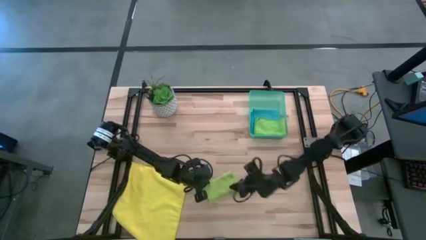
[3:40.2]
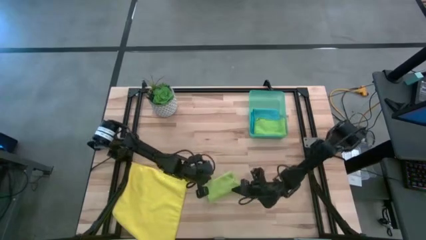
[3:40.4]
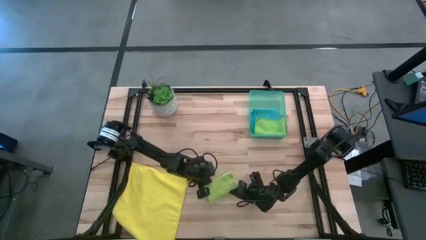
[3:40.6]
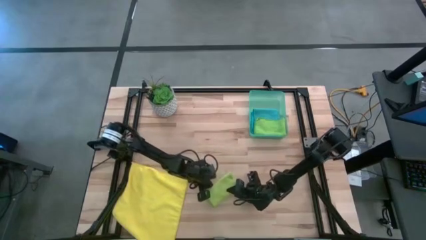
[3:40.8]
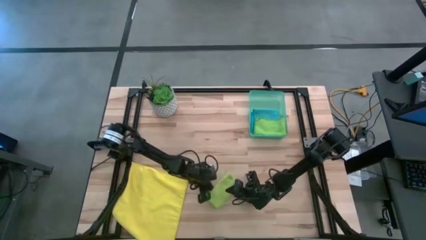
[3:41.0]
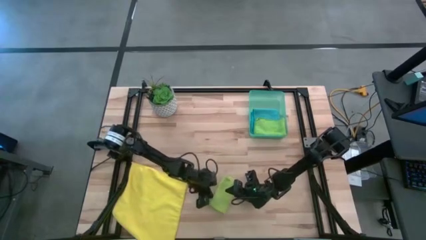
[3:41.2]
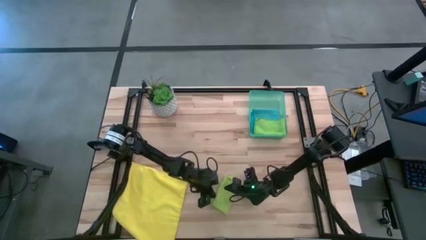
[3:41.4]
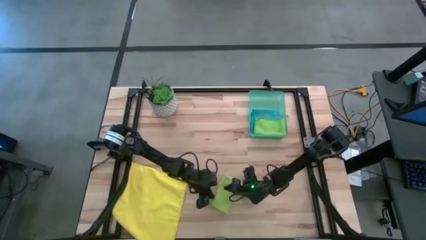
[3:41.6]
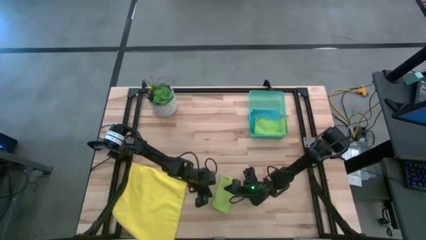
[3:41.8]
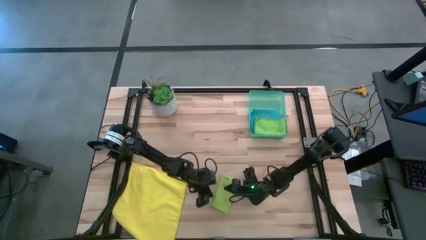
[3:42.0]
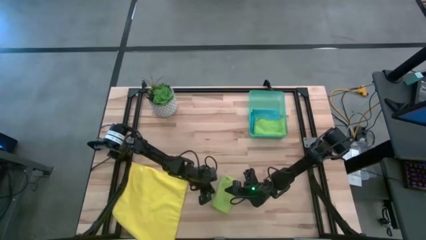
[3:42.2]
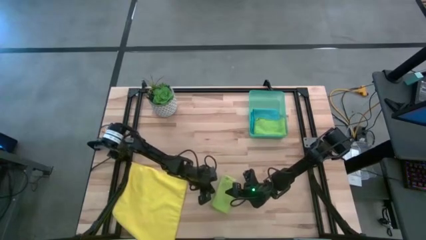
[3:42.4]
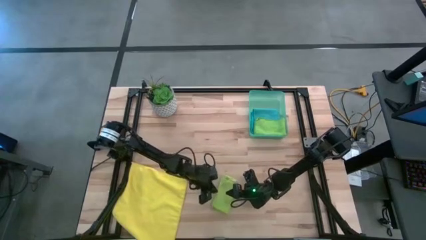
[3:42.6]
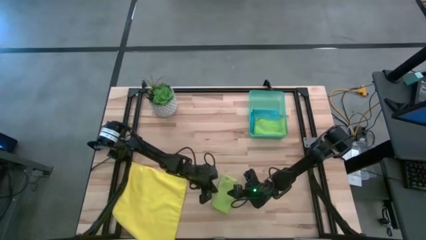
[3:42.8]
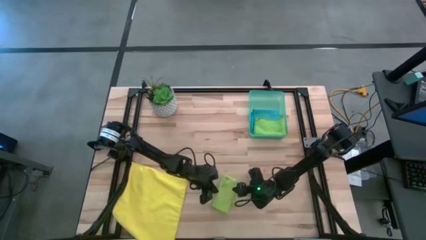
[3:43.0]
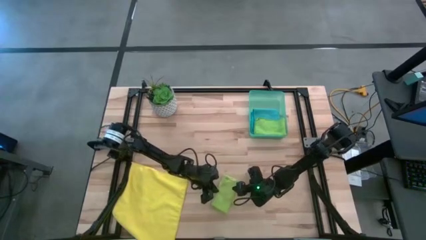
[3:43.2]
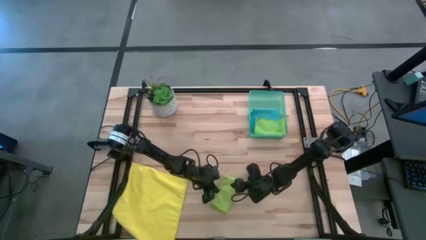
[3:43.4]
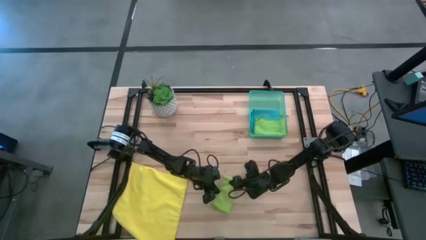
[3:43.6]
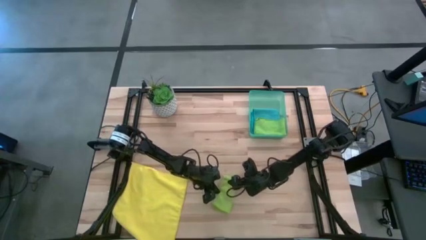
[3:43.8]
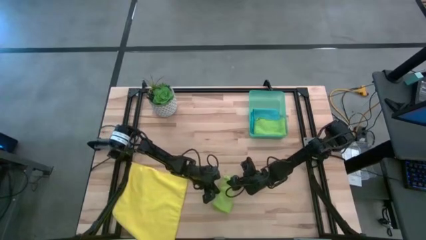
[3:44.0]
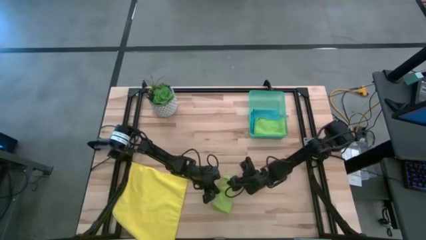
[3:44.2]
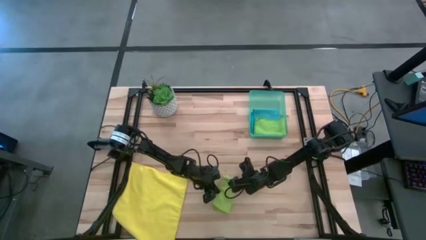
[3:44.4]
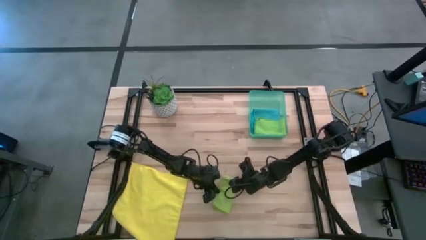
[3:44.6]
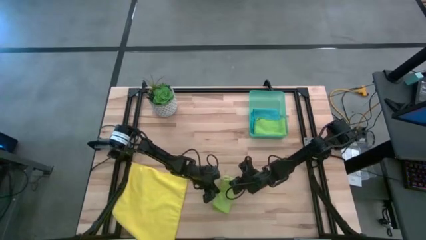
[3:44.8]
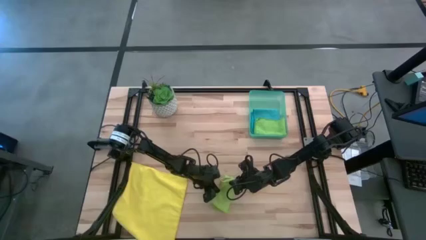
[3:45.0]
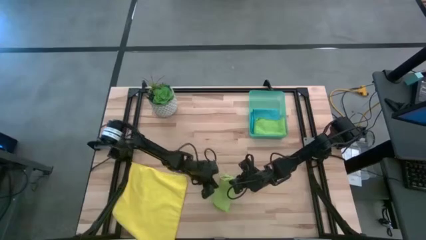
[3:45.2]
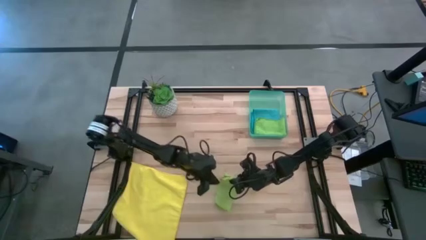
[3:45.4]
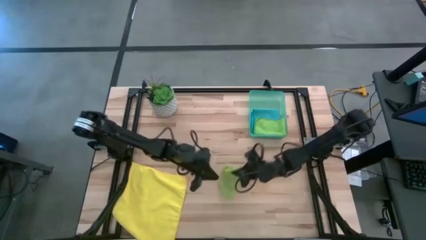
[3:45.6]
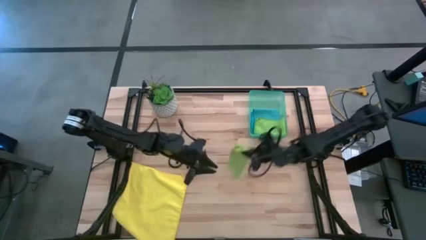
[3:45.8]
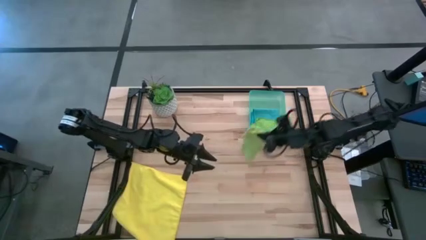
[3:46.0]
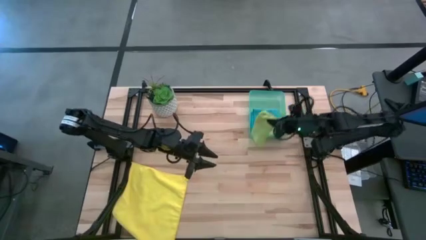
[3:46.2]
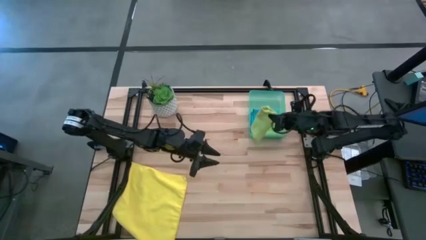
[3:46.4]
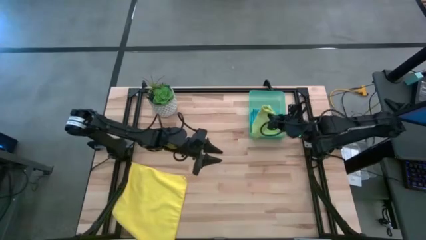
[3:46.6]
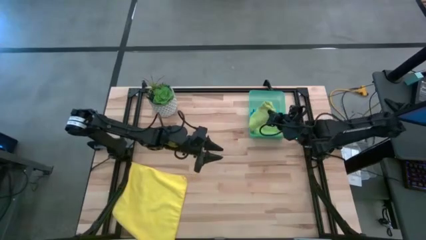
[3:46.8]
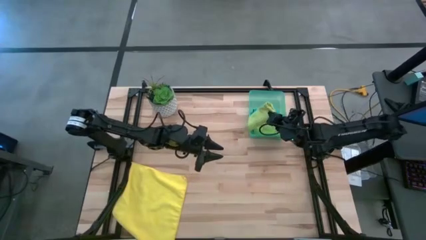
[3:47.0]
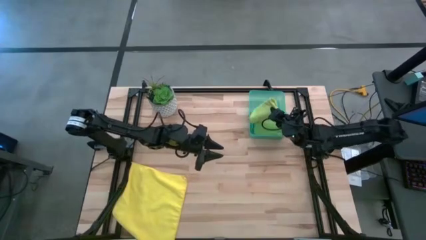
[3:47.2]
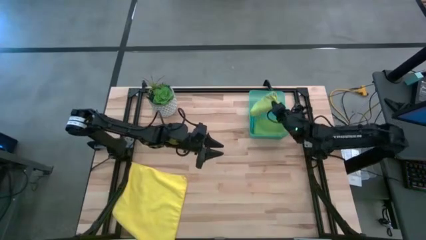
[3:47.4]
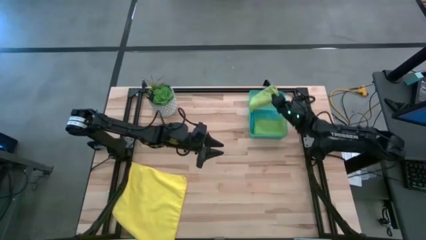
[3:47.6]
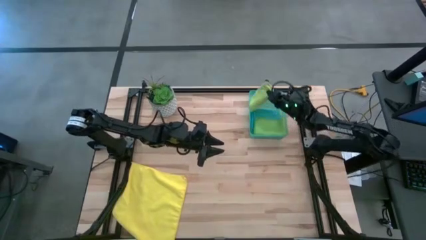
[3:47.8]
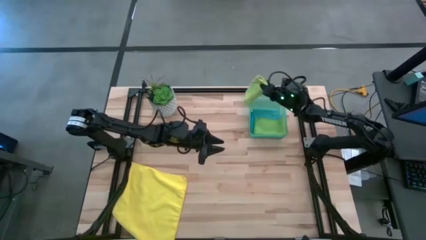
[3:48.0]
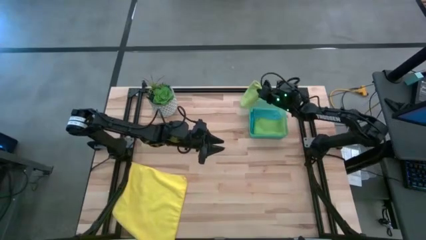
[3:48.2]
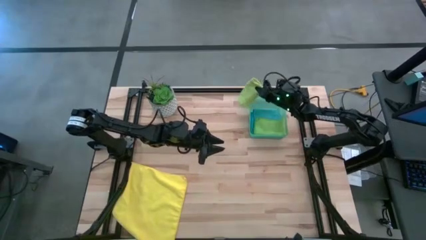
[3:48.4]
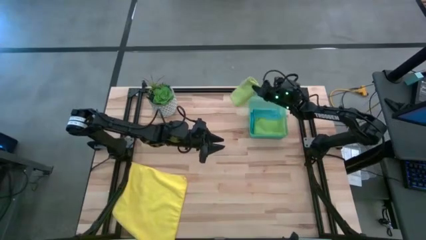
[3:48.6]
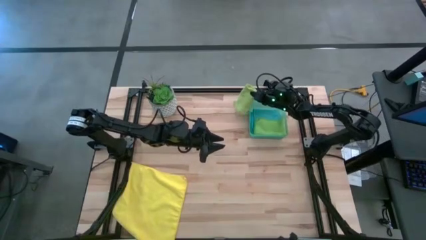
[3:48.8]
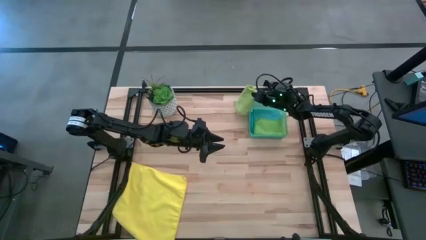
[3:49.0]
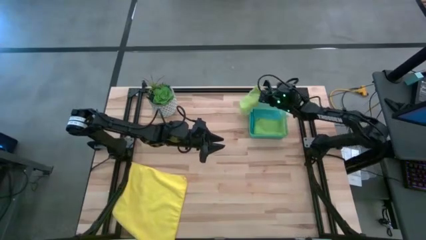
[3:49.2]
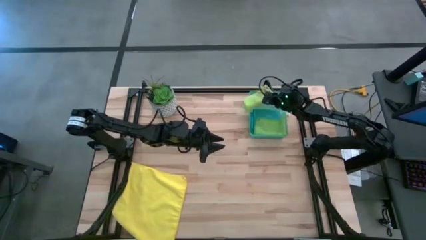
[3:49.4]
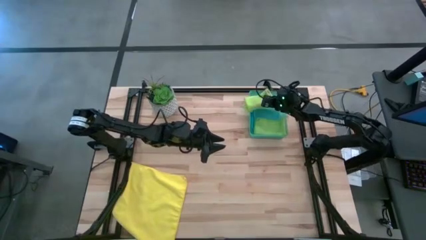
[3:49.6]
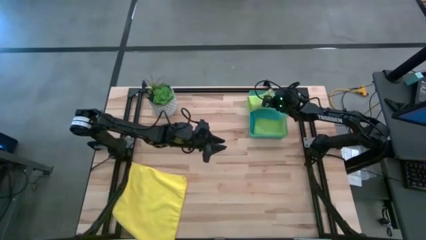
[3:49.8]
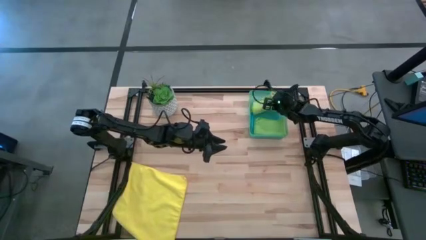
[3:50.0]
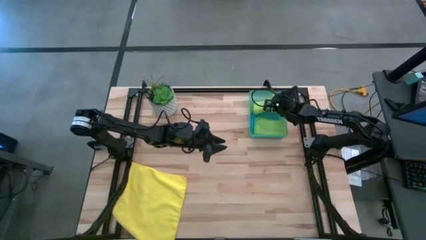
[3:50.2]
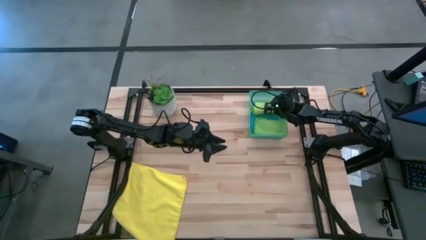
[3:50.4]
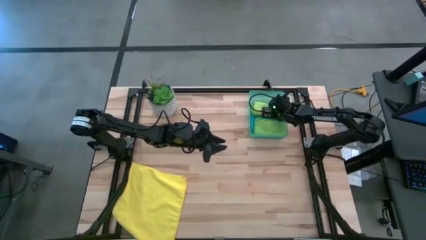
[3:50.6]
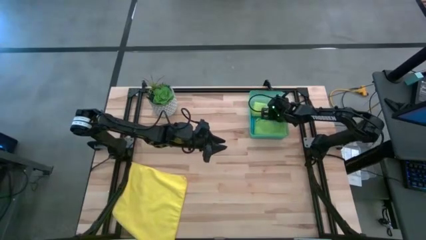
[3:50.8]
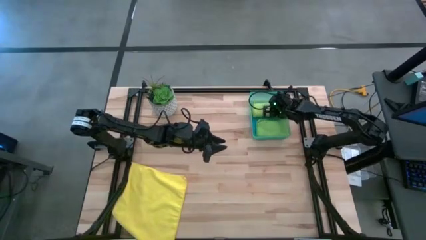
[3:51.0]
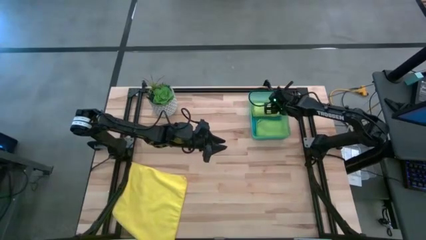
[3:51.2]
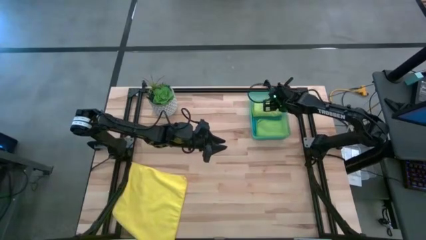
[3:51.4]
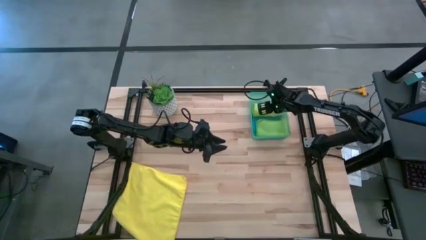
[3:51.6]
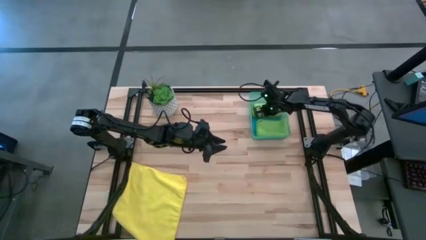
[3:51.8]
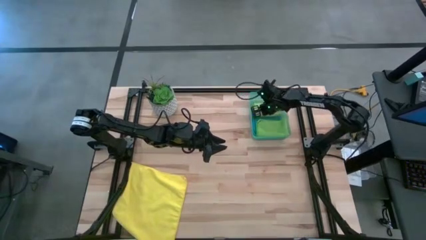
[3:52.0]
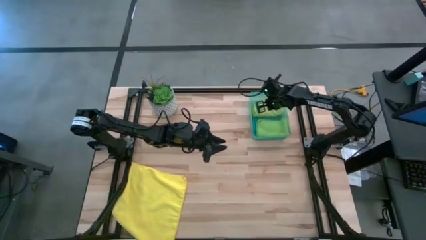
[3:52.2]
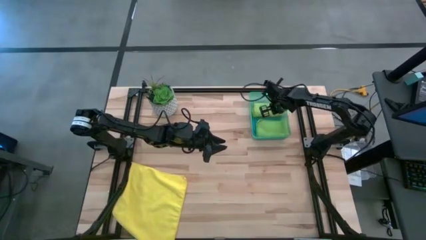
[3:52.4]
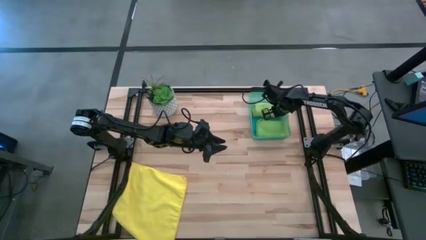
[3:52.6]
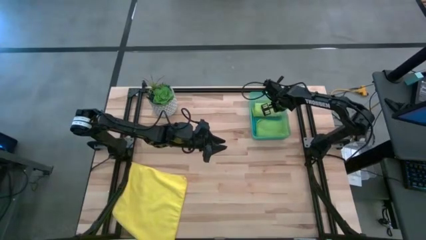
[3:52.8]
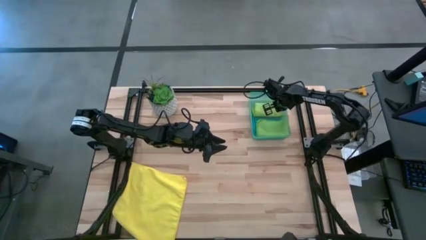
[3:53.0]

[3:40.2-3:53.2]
Task: Fold microfiber towels
Put the light green towel into the container
